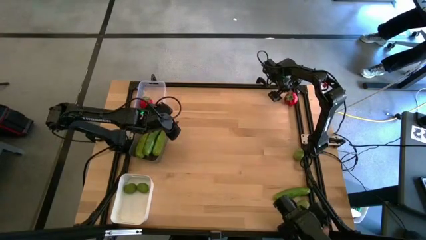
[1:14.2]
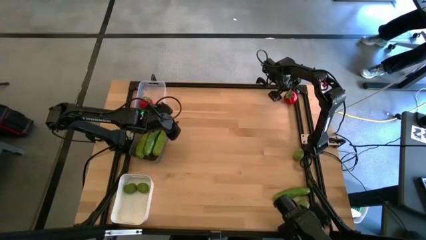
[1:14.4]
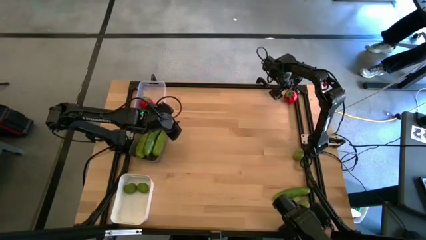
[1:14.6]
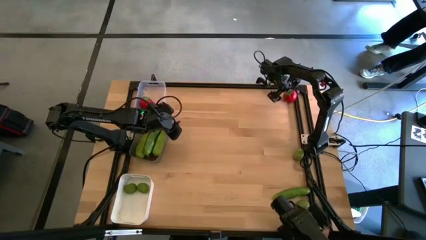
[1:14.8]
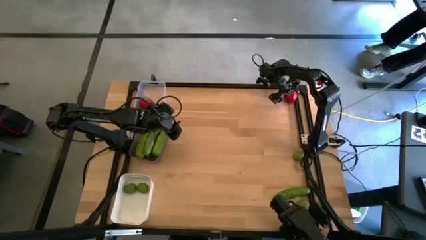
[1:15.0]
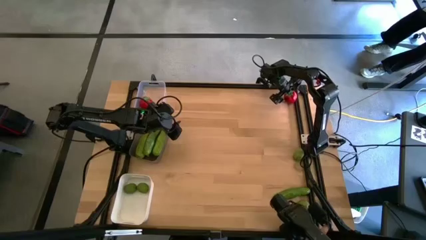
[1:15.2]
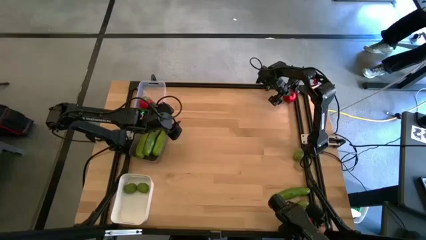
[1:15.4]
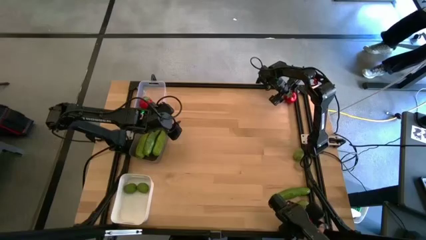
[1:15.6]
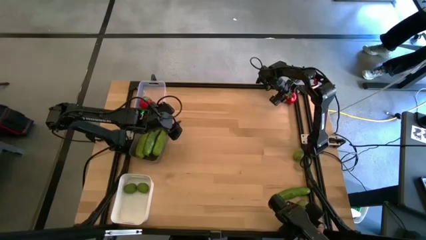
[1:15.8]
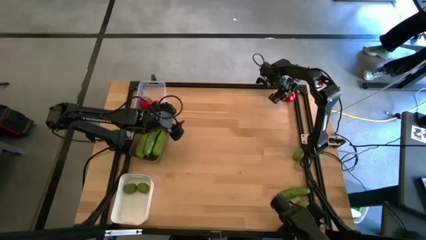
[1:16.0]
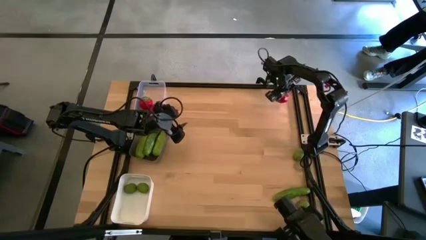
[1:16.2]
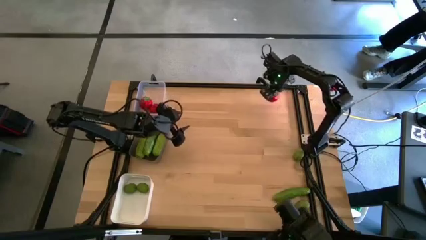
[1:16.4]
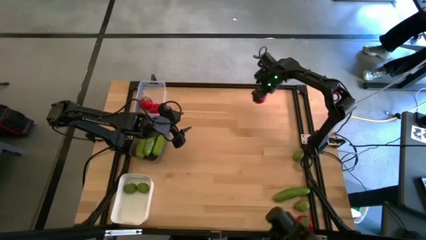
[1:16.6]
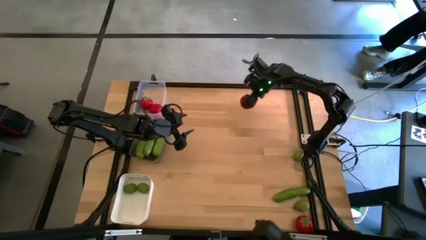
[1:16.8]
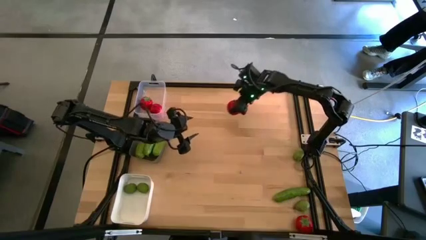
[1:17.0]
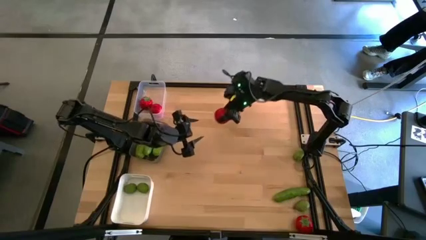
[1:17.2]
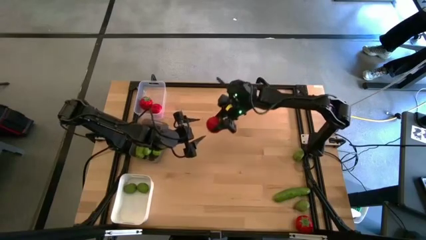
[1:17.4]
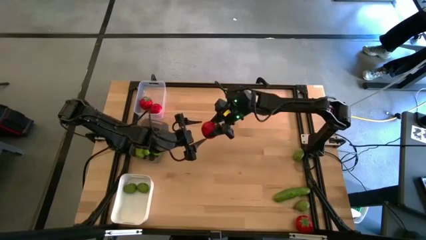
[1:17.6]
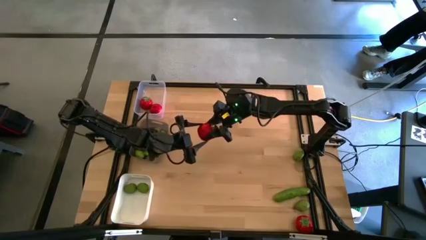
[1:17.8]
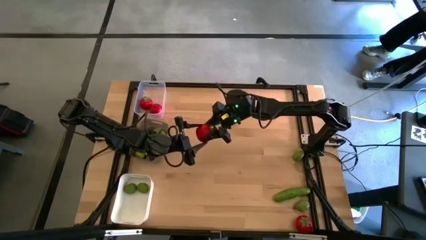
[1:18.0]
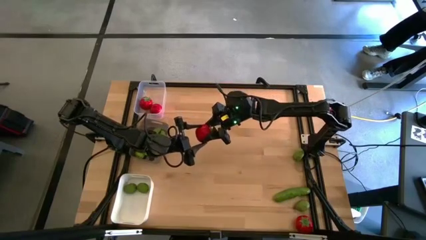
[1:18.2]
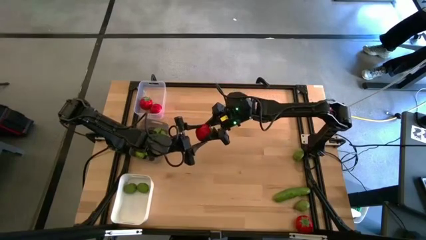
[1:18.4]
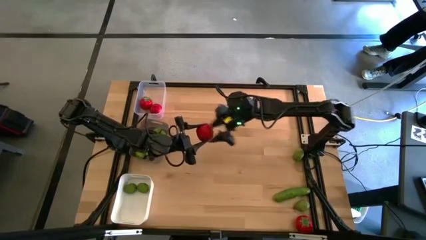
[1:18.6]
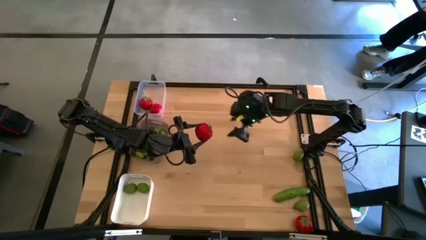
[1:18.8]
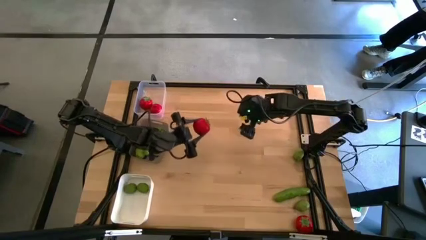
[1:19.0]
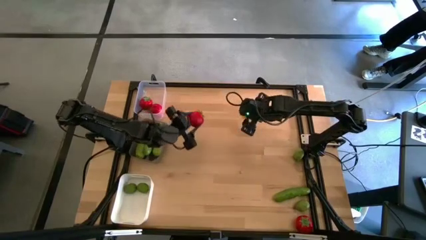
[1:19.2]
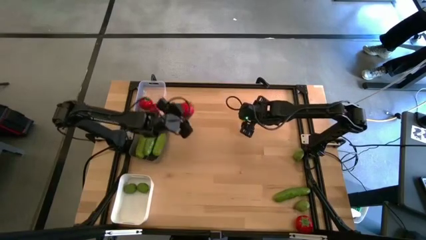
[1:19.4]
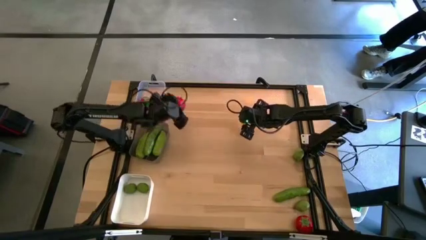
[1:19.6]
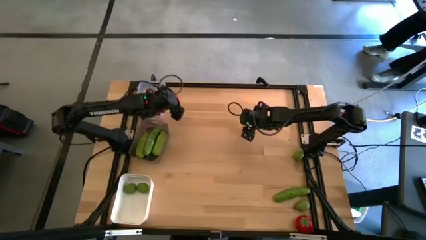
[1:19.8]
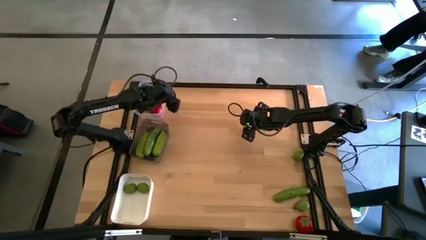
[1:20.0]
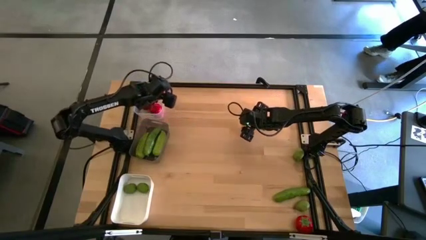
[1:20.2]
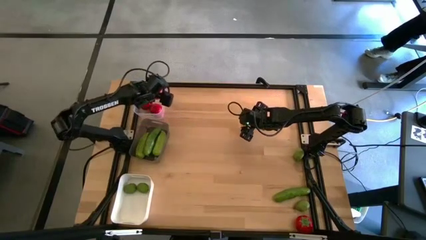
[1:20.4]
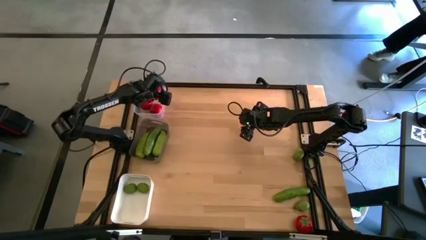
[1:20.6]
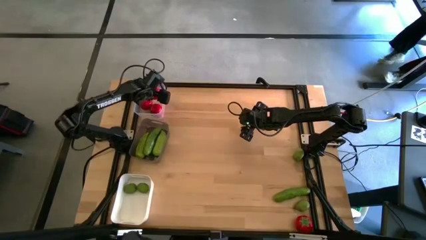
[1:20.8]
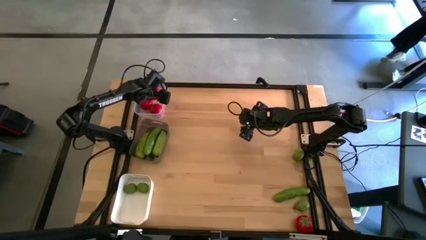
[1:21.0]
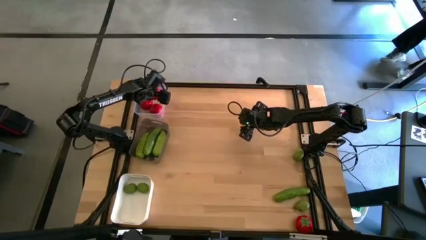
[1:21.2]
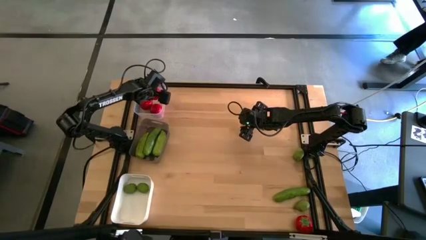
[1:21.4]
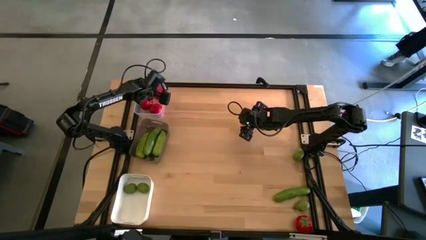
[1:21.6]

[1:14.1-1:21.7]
Task: Sort produce into baskets
Put the top tomato into the transparent bin

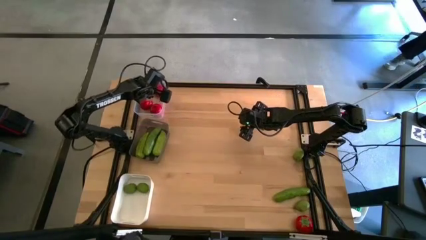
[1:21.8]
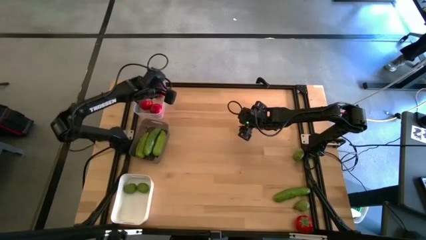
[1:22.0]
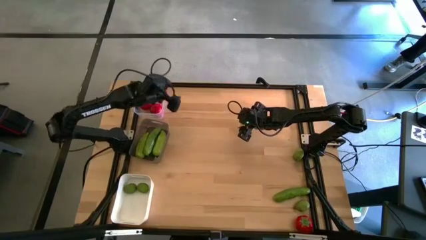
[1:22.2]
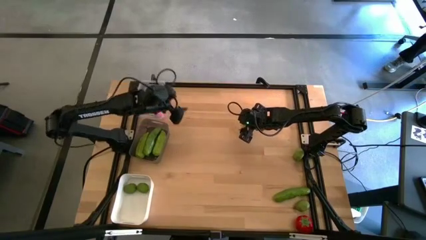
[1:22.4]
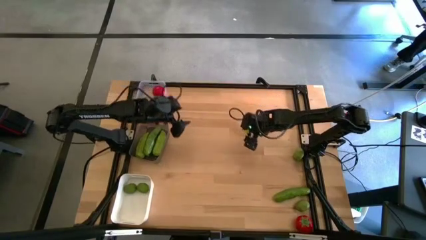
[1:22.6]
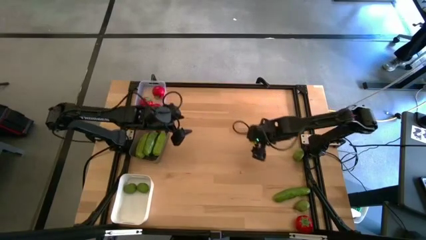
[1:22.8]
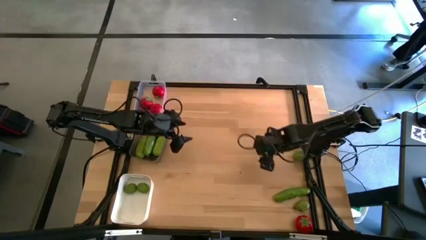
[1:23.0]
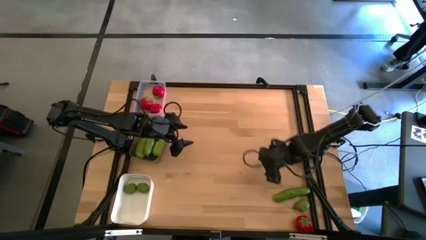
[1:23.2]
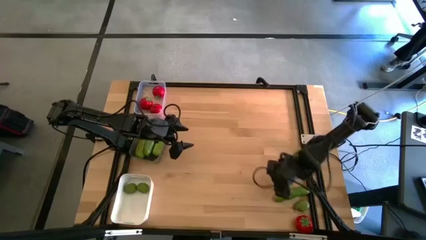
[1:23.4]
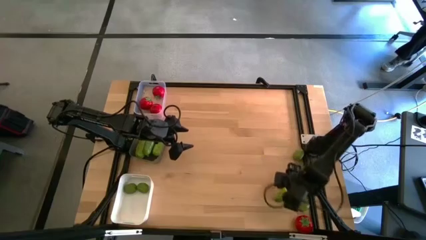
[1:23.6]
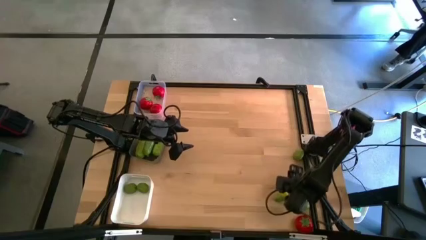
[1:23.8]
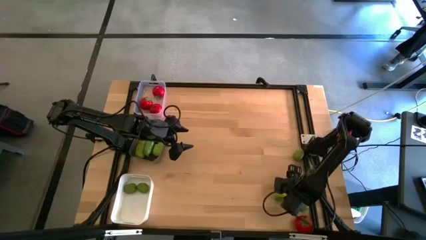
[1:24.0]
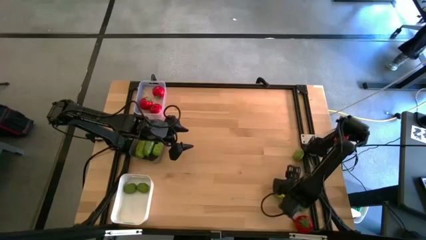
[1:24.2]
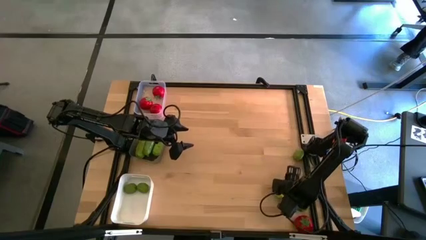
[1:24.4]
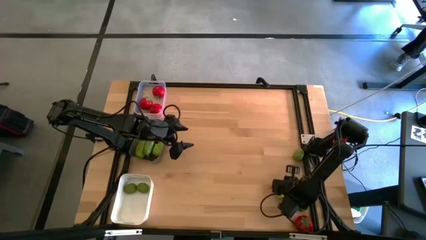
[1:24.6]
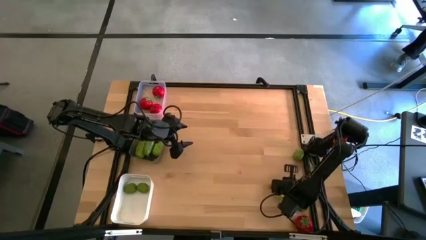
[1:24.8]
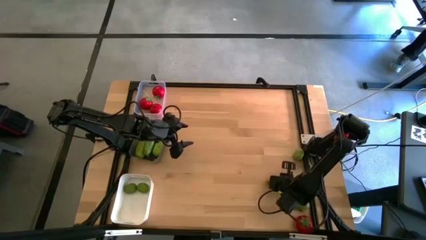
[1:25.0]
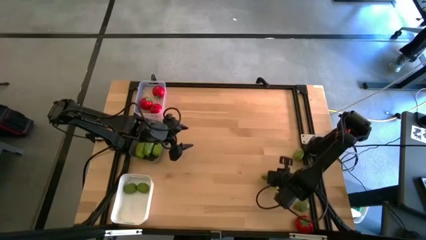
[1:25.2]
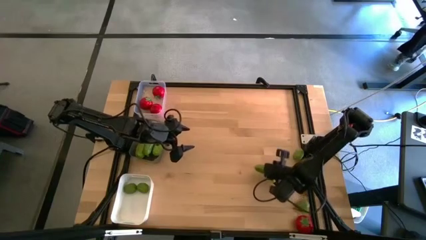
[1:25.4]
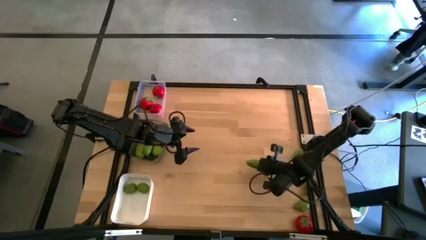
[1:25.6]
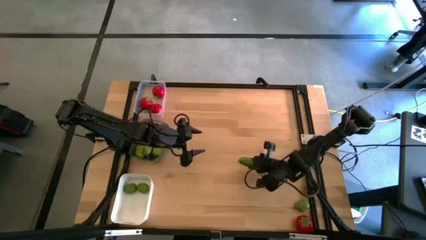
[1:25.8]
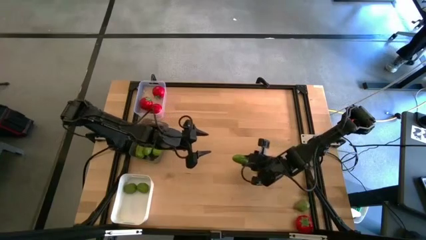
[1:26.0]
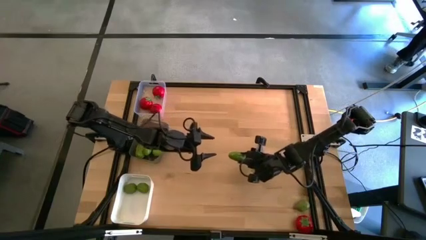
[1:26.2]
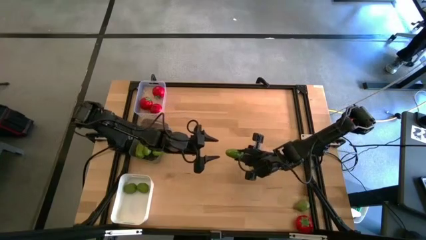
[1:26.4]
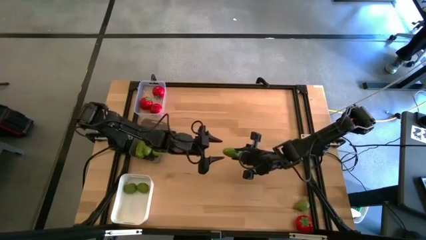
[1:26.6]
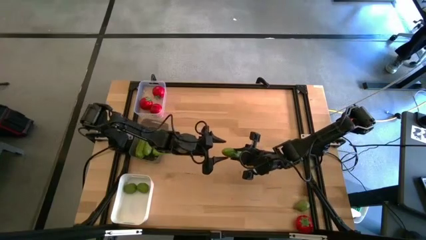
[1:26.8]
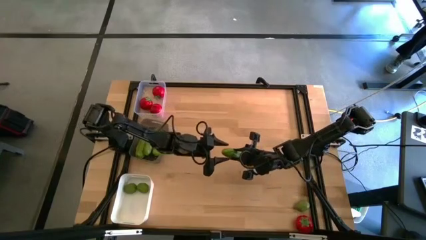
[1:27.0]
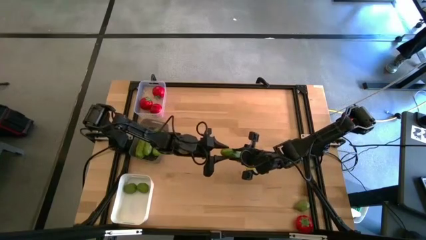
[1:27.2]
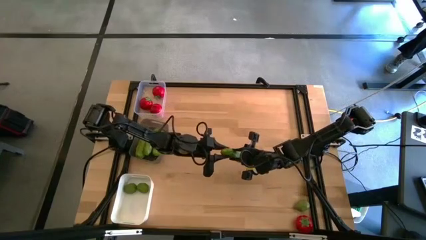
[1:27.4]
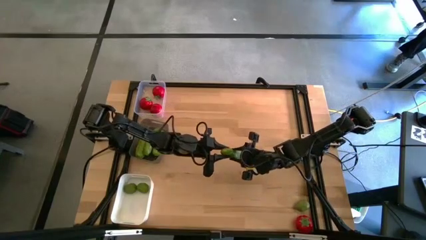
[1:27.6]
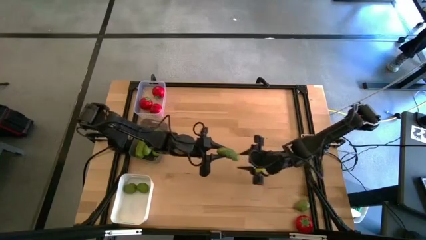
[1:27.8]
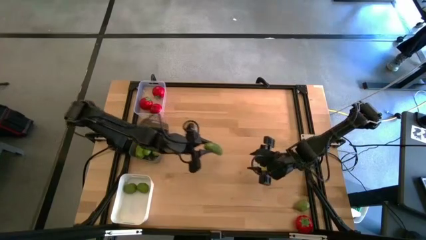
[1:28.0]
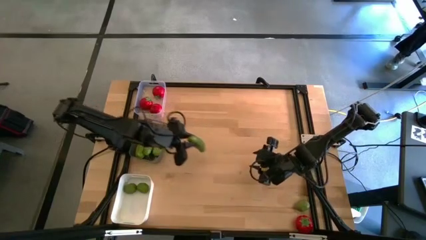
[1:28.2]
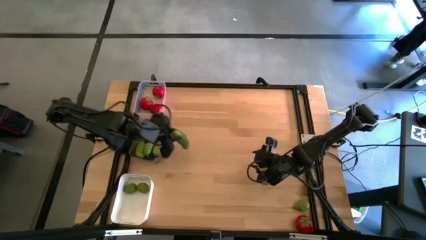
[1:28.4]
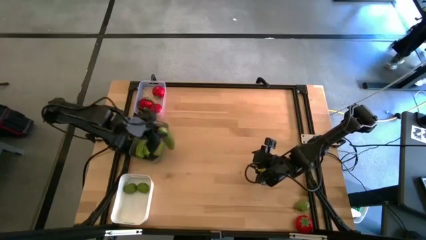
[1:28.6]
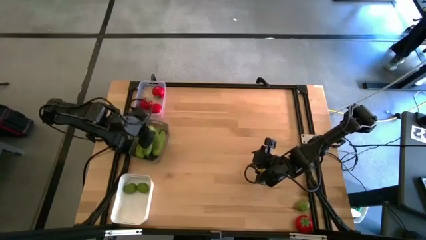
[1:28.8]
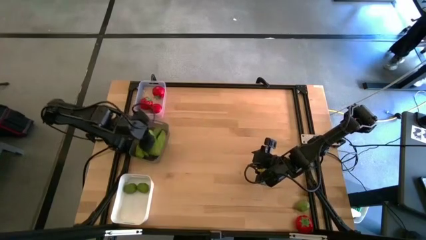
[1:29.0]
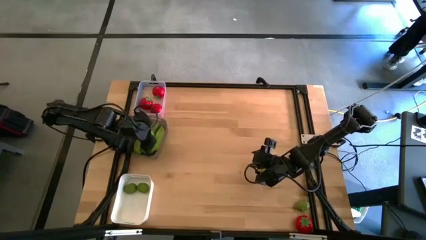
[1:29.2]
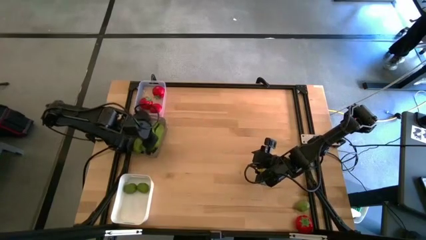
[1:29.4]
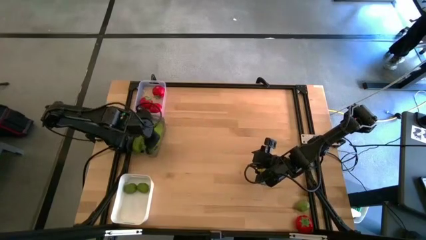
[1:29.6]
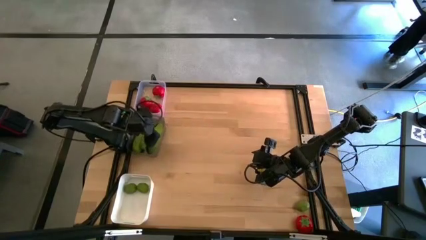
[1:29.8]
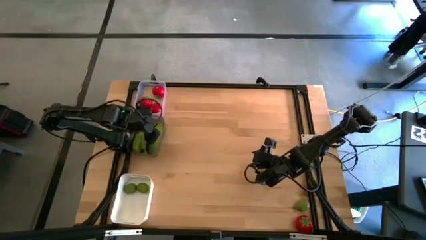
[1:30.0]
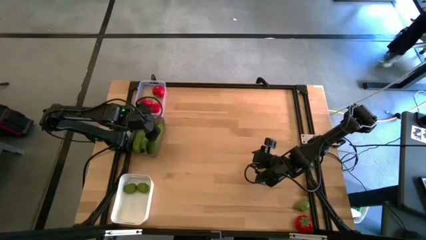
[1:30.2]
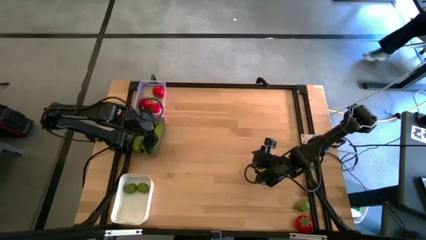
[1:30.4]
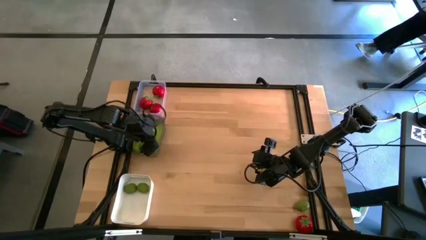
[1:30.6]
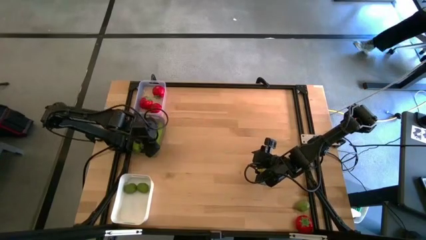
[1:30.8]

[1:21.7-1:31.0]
Put the bitter melon into the black bin
